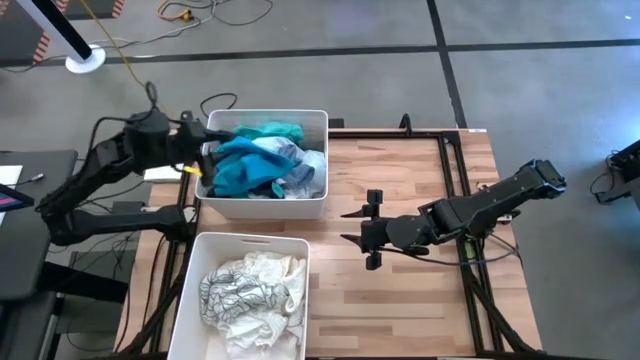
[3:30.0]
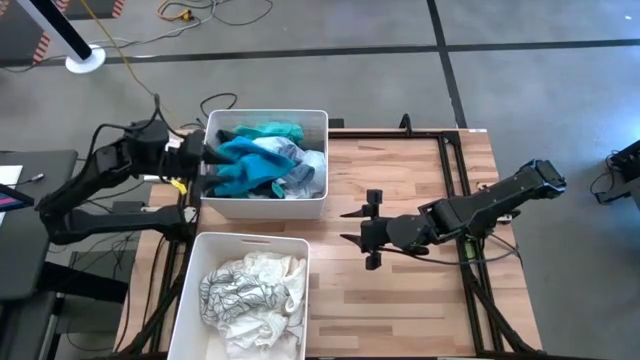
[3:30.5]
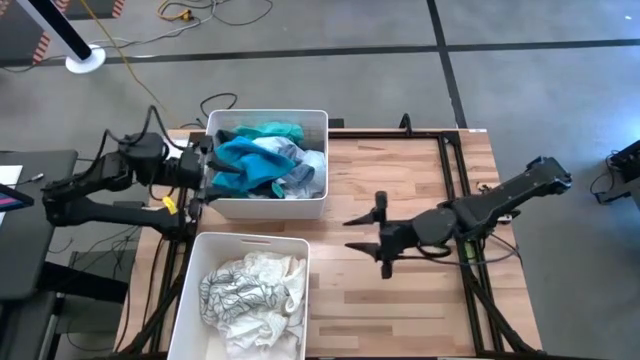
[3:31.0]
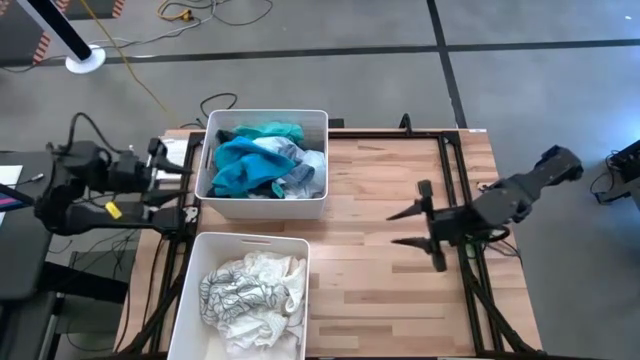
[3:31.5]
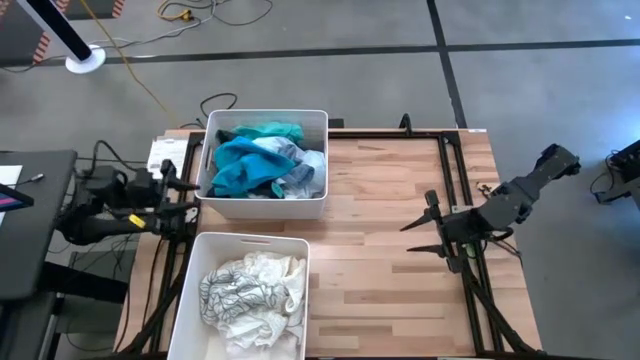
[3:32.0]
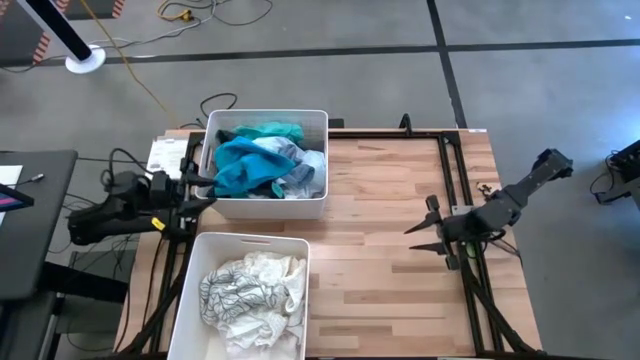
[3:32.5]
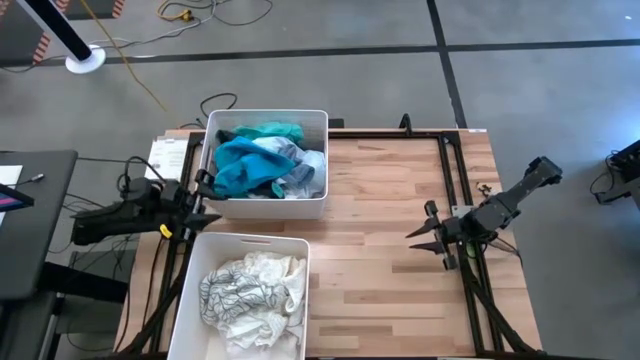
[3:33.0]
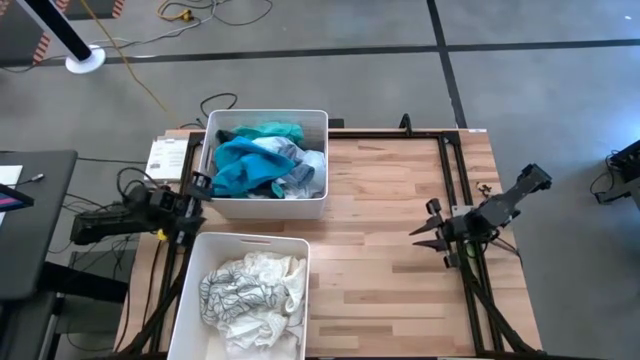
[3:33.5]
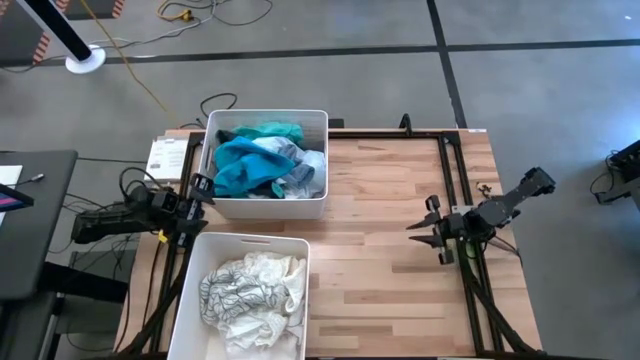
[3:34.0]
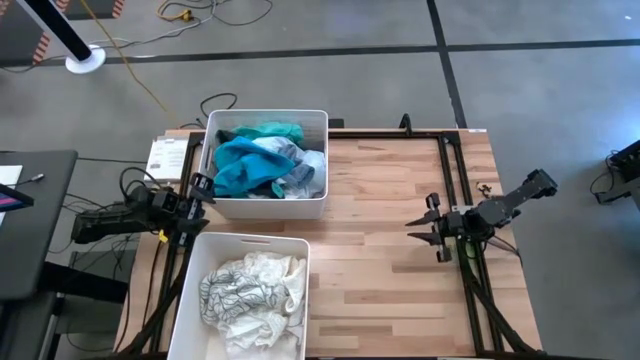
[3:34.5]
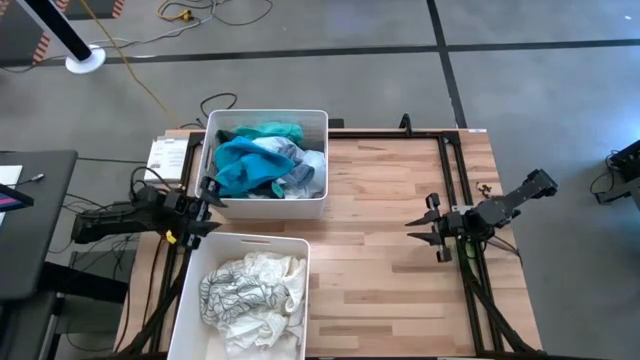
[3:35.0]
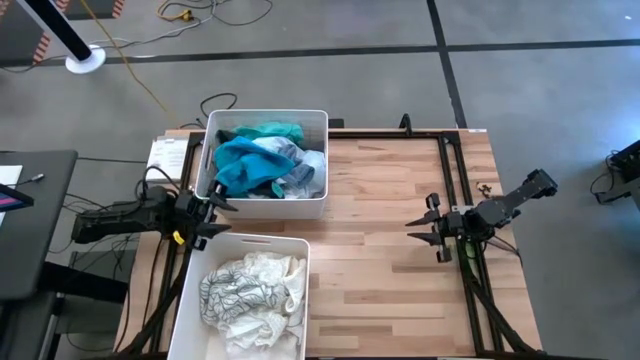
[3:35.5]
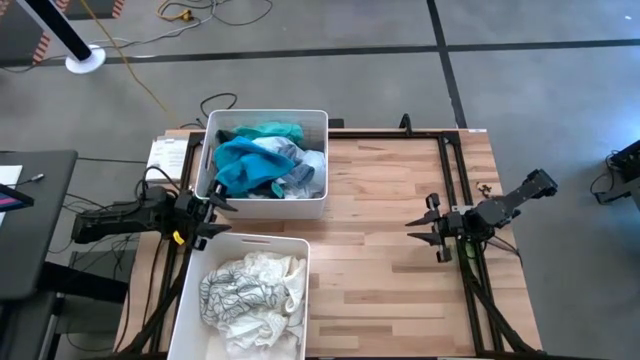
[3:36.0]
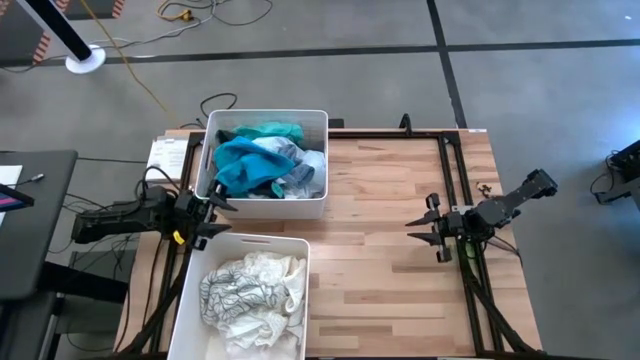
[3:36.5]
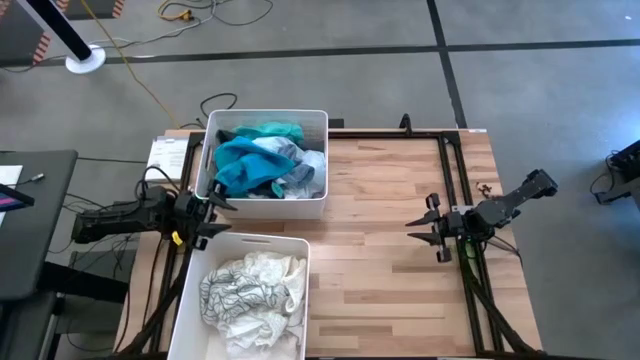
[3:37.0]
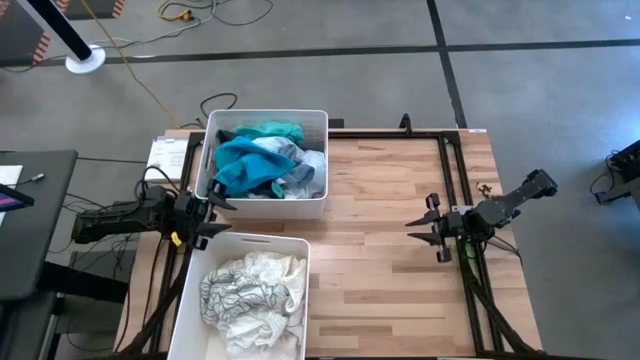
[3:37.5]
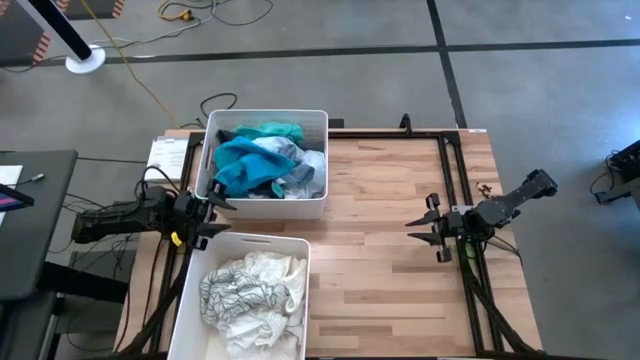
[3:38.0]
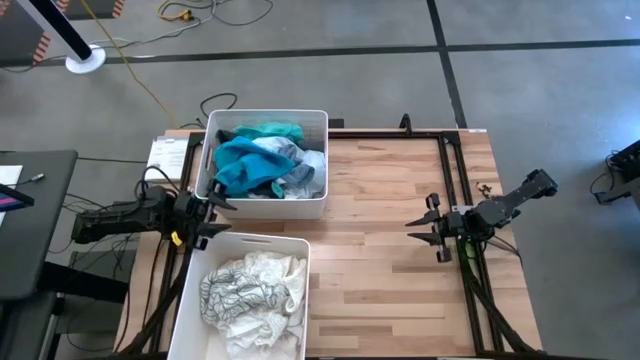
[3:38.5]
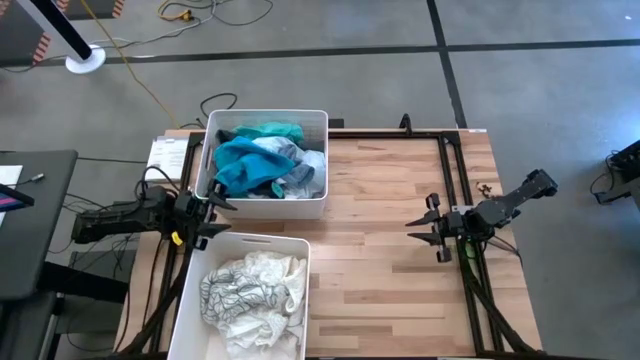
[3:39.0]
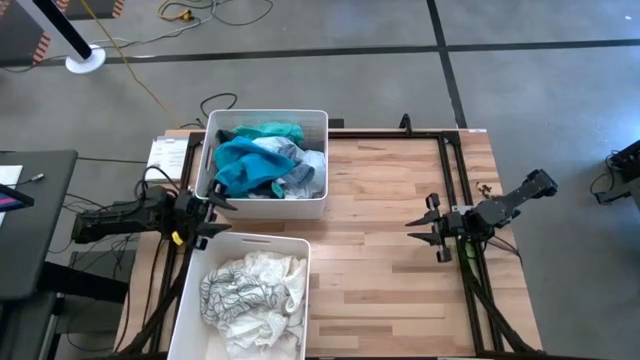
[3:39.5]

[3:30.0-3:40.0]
Task: Sort clothes
Return to Home Position

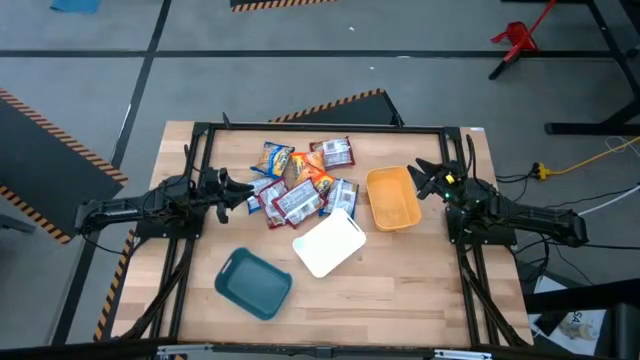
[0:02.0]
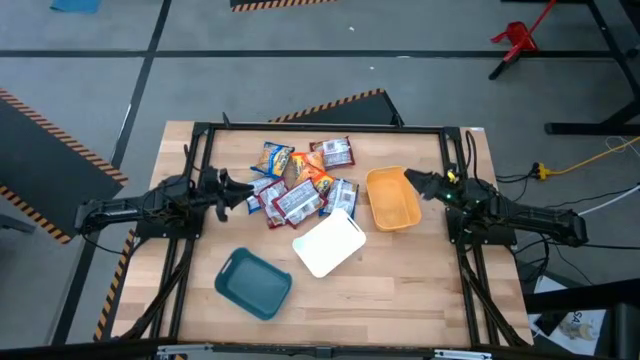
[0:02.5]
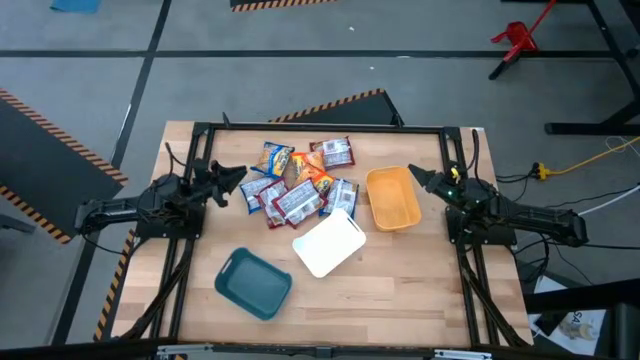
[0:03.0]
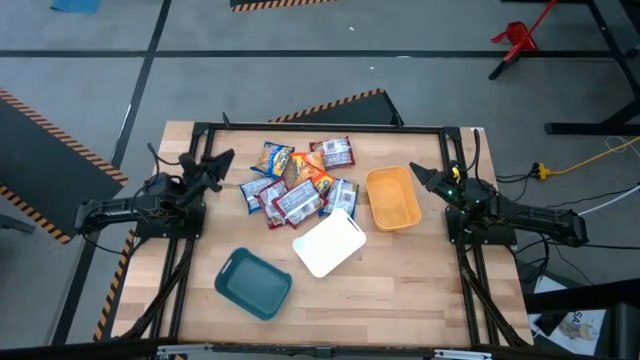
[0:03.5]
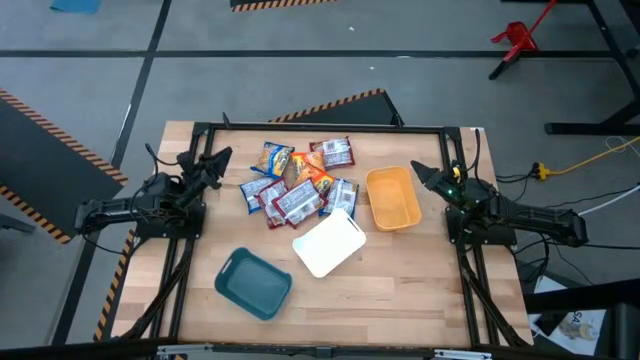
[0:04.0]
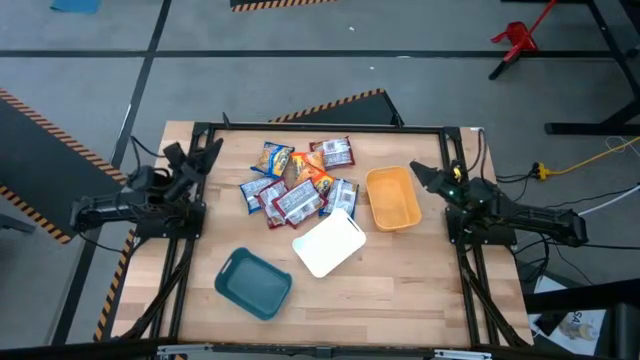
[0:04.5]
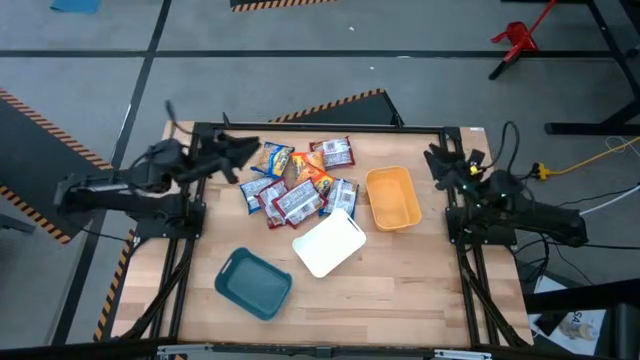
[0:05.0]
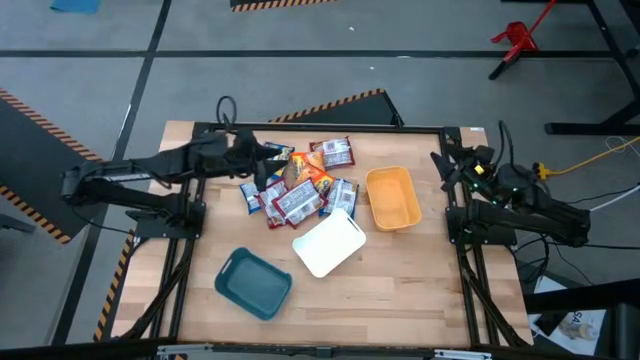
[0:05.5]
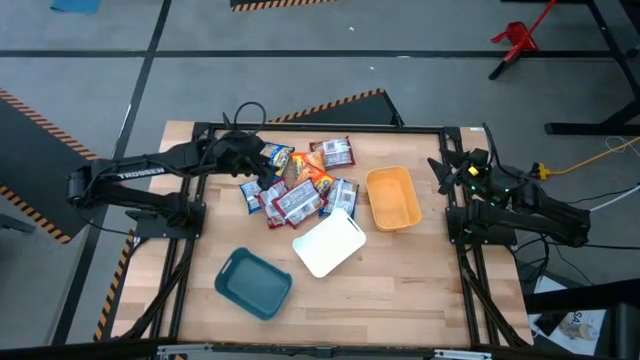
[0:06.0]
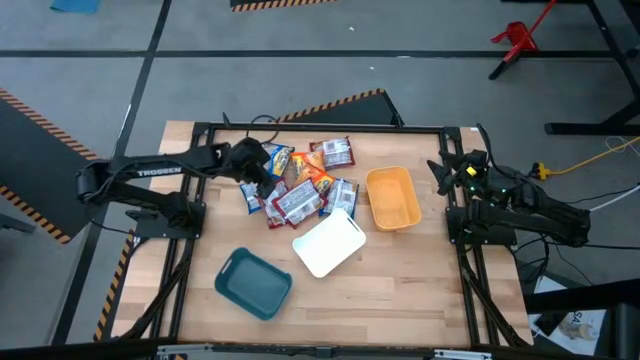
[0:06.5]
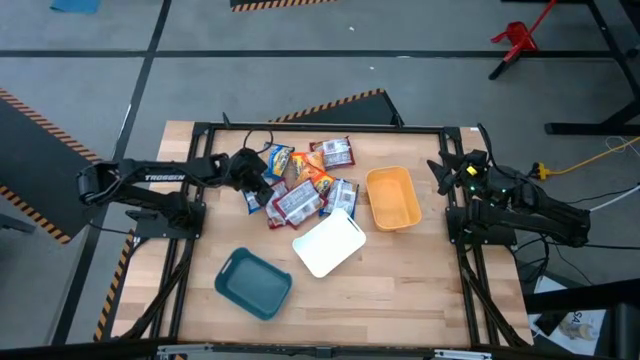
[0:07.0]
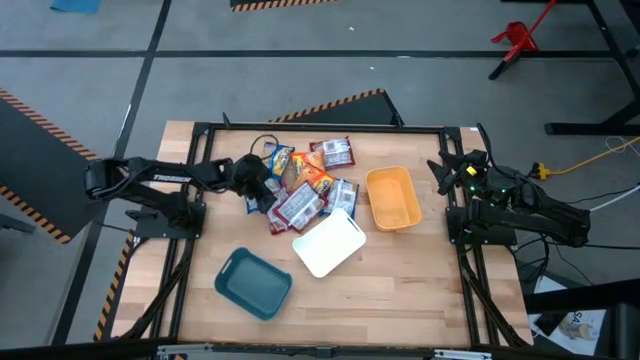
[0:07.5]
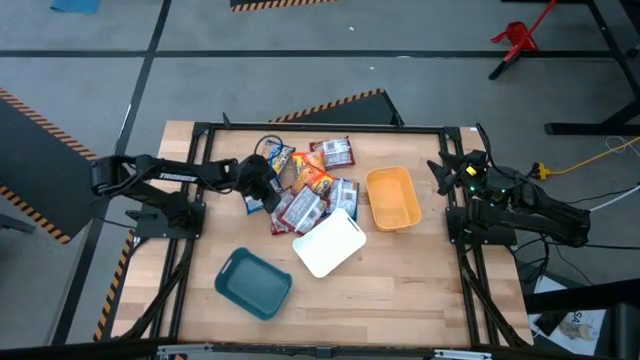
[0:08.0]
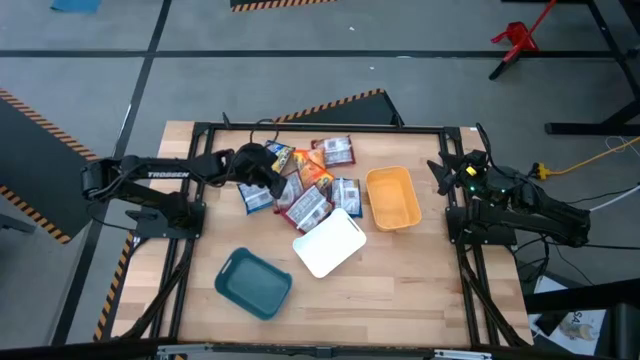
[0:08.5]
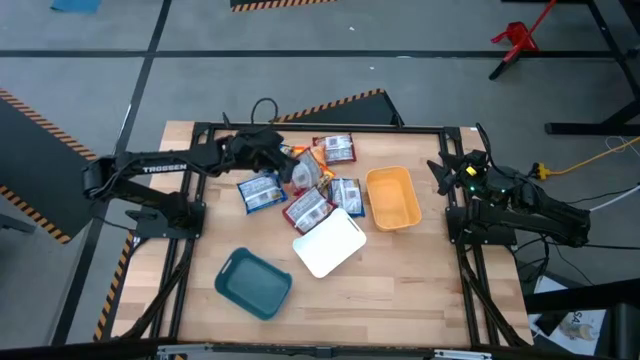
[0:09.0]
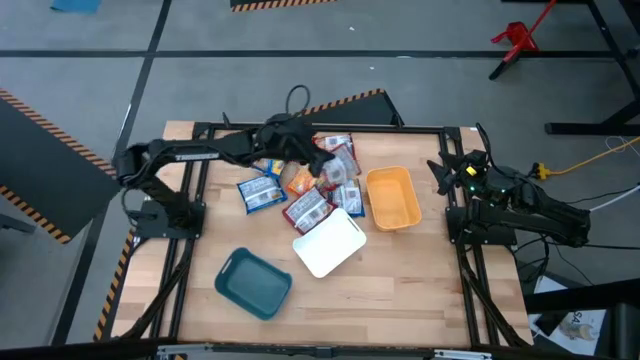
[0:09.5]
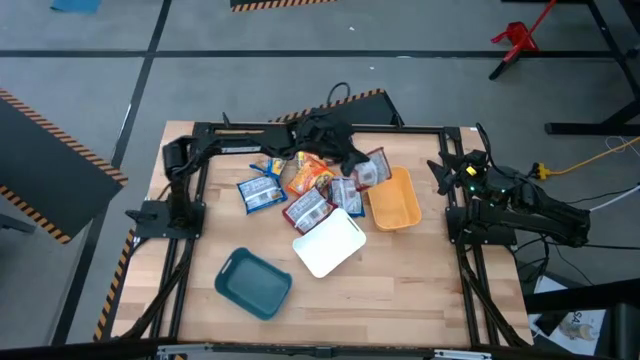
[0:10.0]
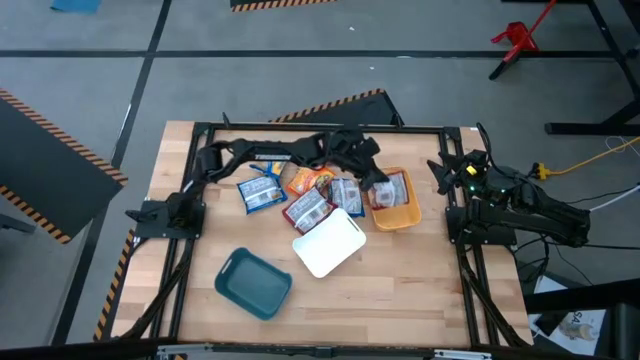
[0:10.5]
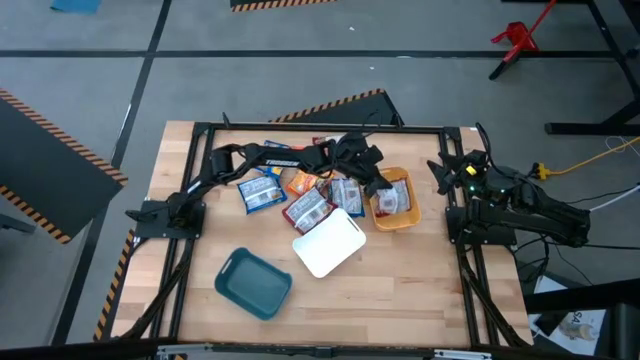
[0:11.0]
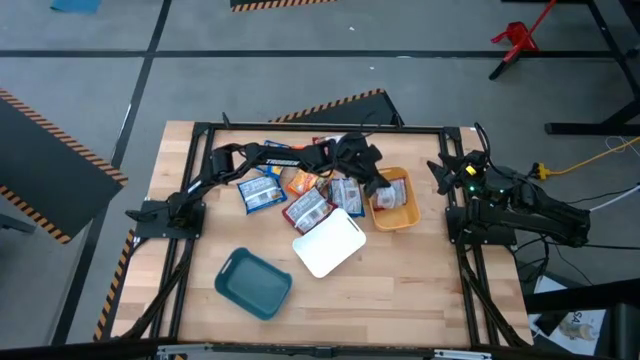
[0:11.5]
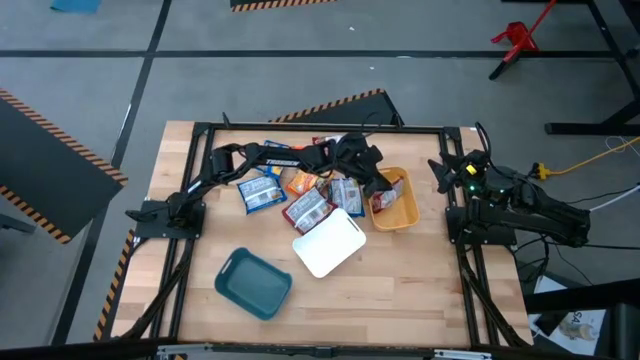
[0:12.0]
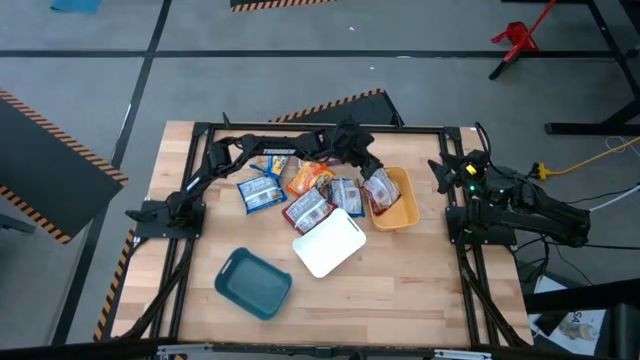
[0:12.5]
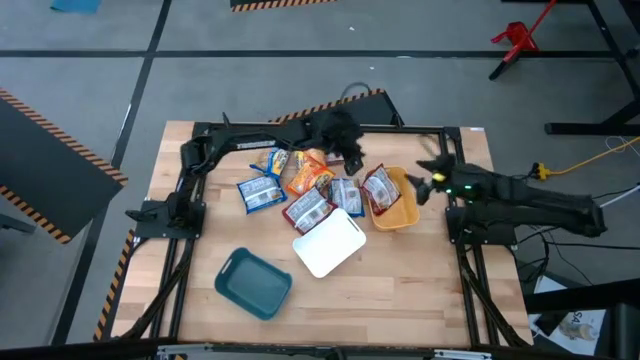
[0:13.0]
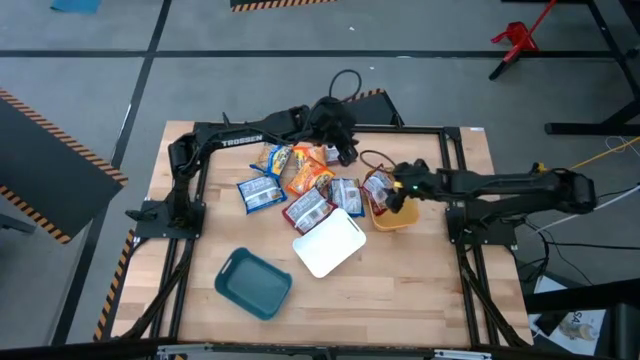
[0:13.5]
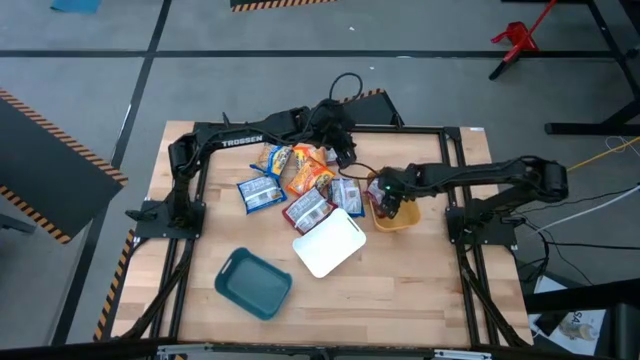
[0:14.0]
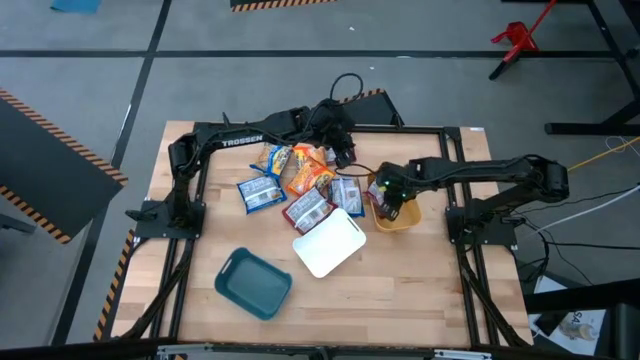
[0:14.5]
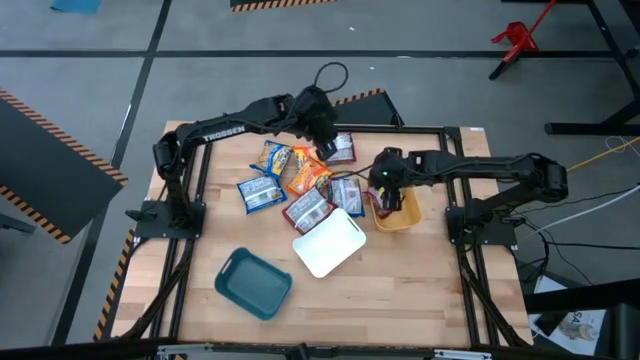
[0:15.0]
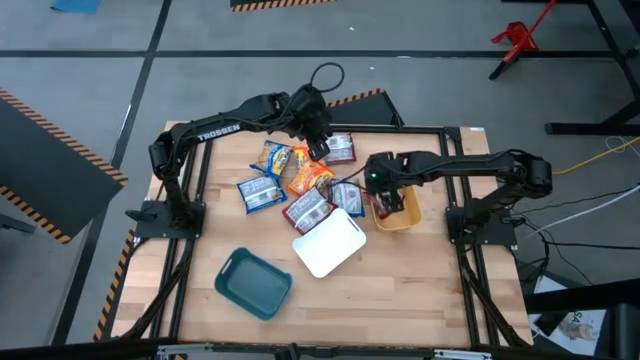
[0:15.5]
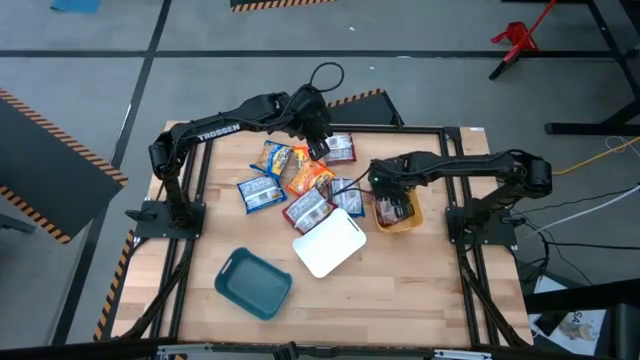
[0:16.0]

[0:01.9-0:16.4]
Task: Sort Maruchan noodles
Put the bottom left red noodle pack into the yellow bin
